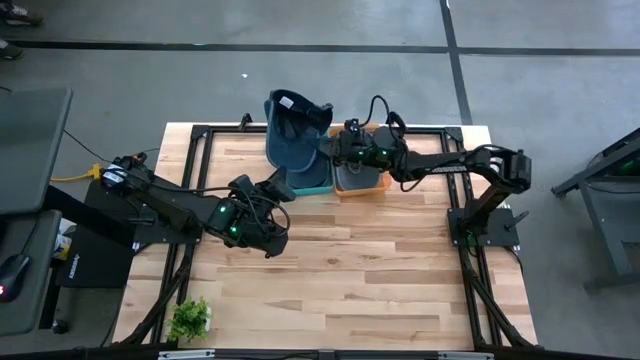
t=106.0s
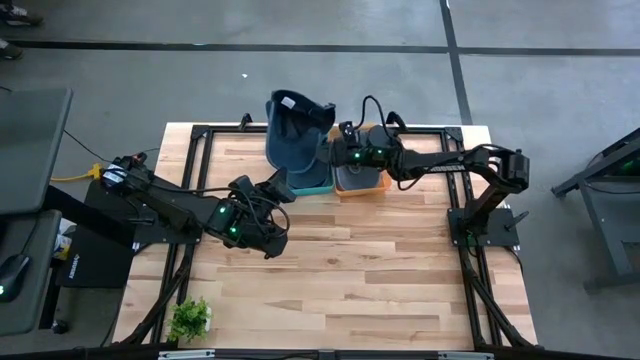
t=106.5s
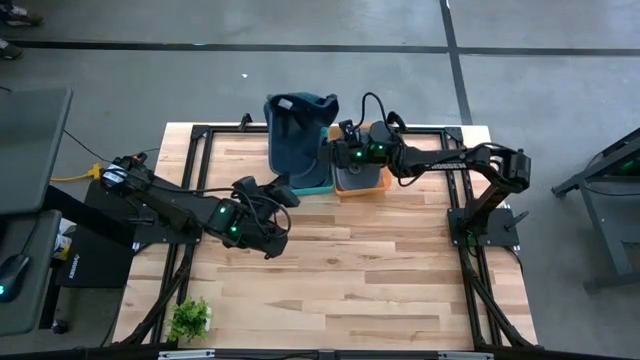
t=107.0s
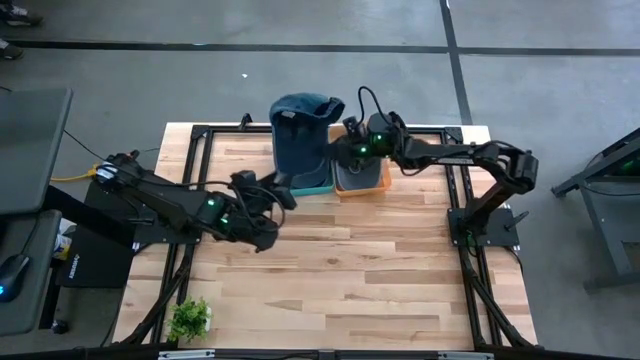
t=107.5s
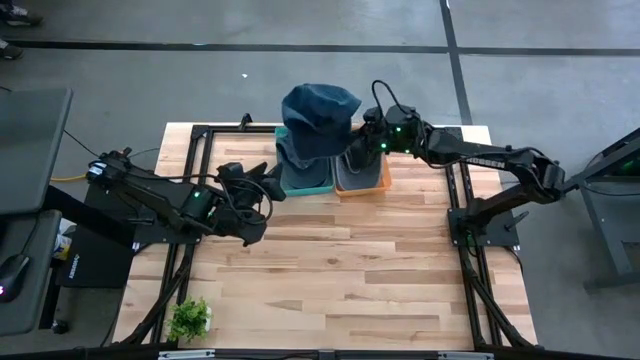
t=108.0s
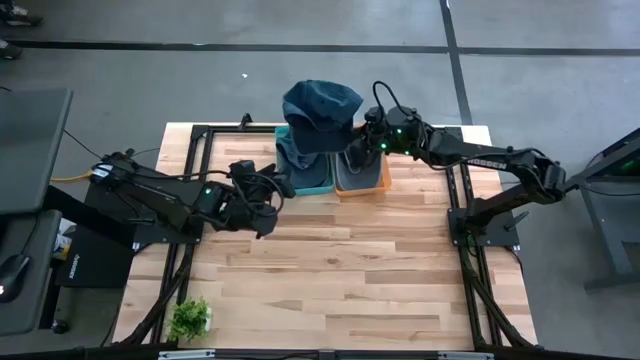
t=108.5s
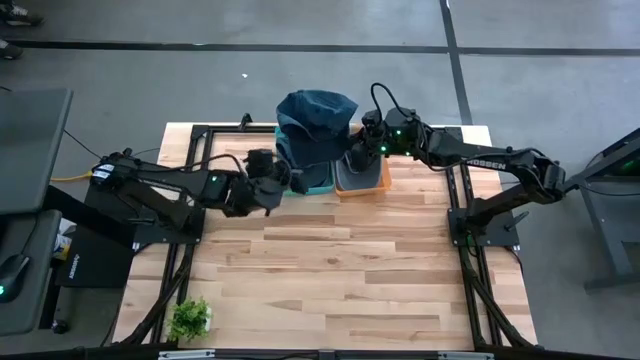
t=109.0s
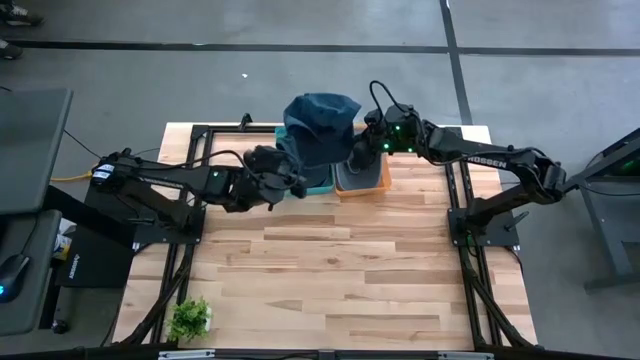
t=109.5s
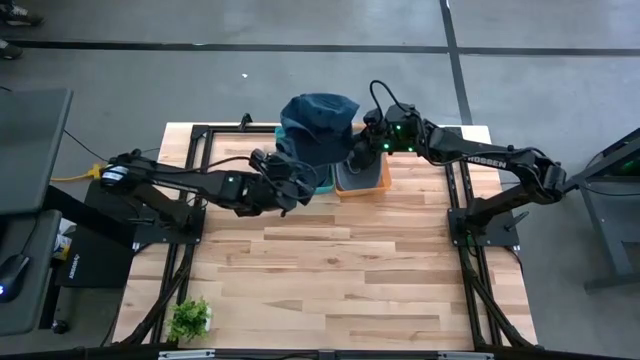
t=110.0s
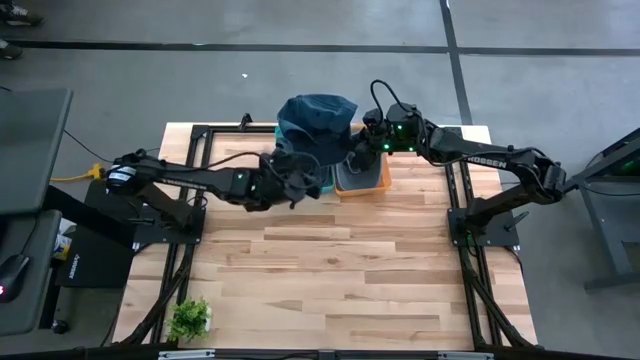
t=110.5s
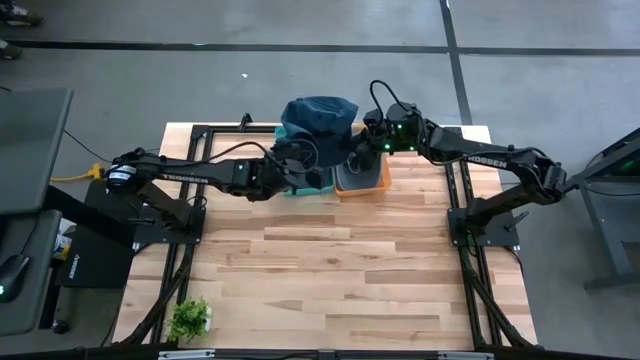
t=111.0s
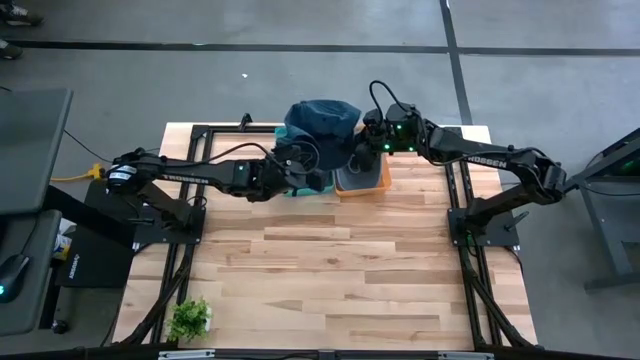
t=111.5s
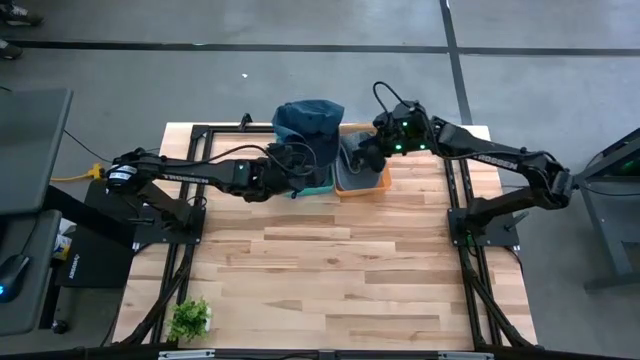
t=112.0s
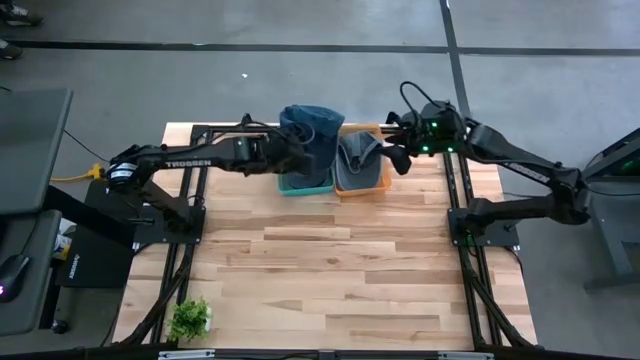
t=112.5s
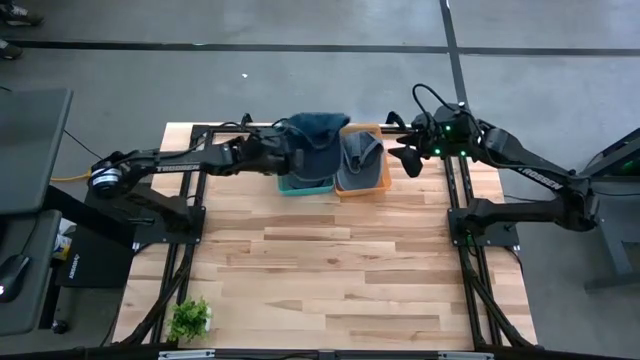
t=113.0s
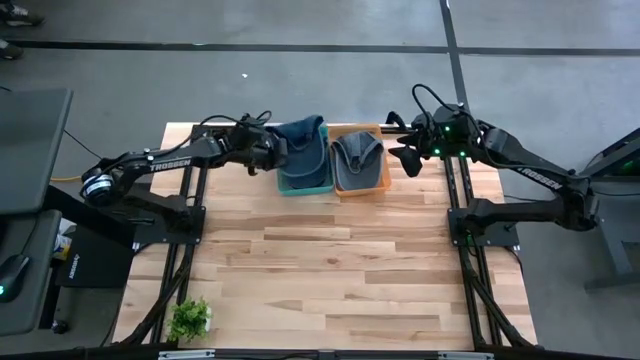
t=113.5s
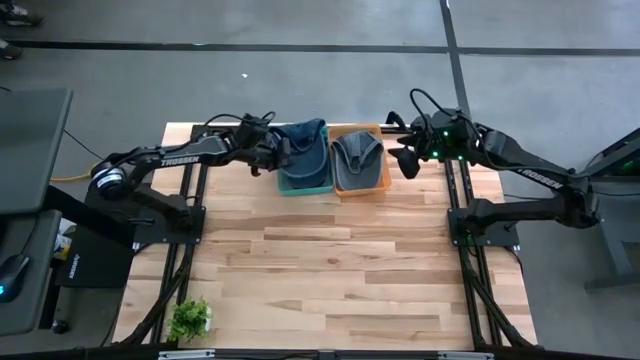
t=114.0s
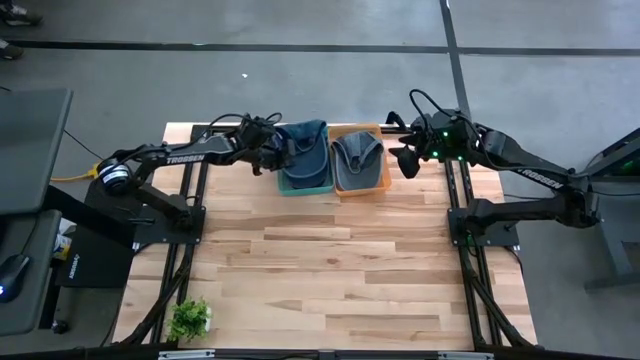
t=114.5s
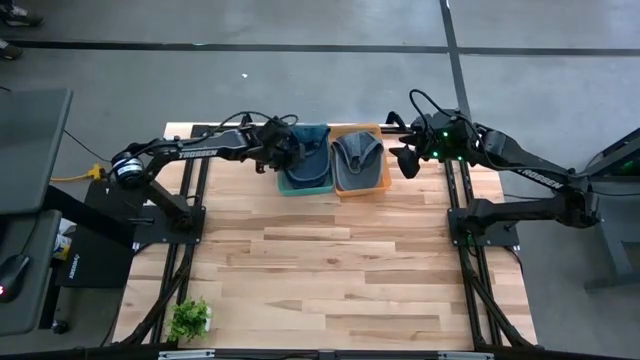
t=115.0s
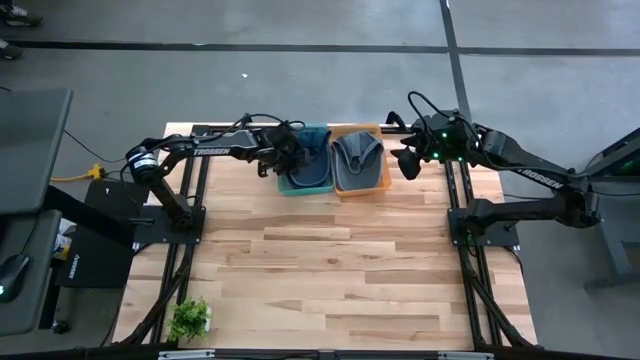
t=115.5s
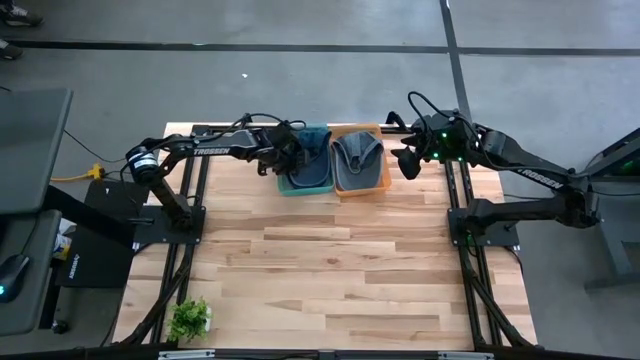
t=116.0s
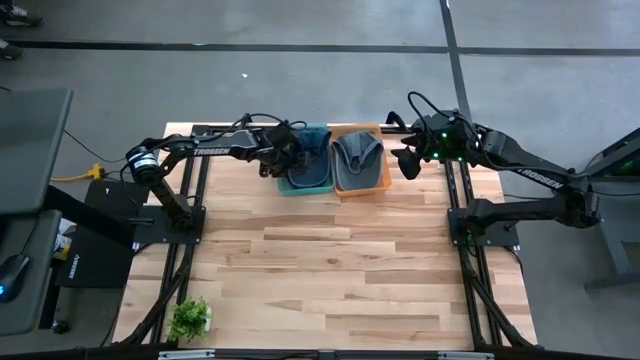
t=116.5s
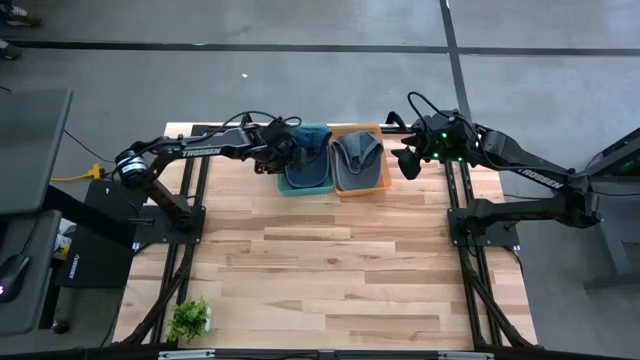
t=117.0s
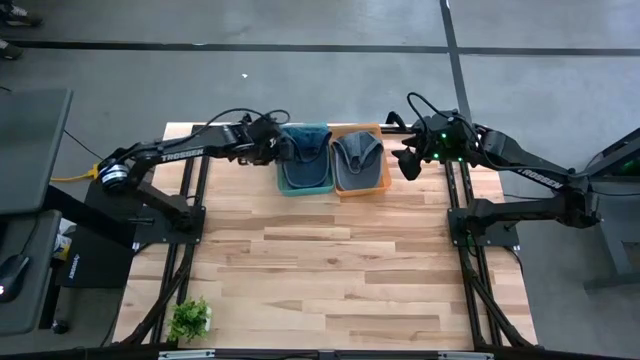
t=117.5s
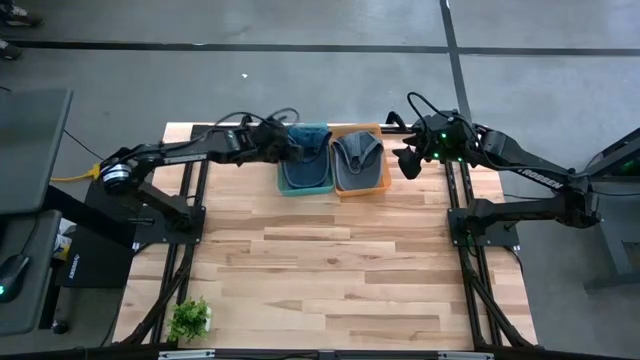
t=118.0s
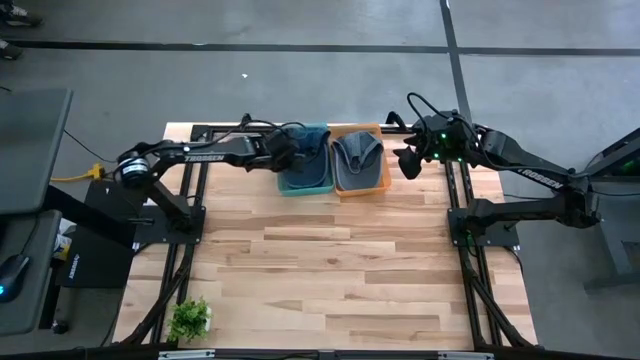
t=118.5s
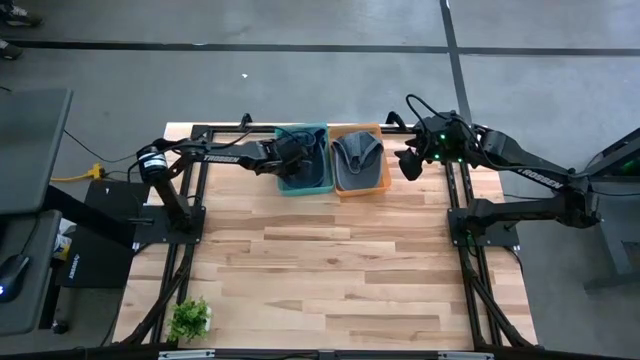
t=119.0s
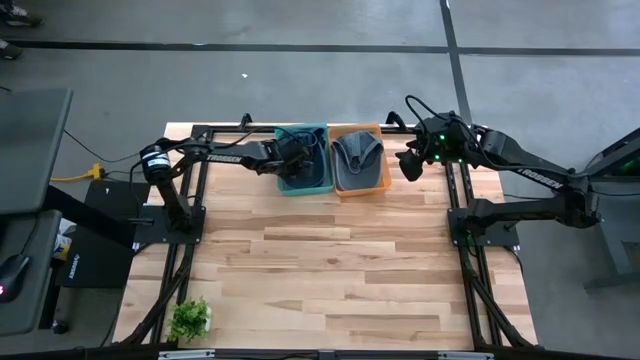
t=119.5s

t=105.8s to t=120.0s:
Task: Pick & Place hat
Put the blue cap into the green bin

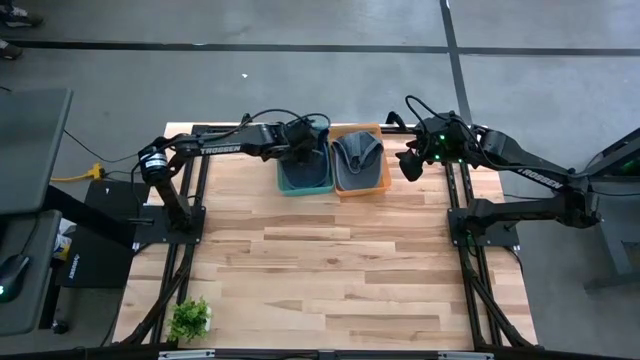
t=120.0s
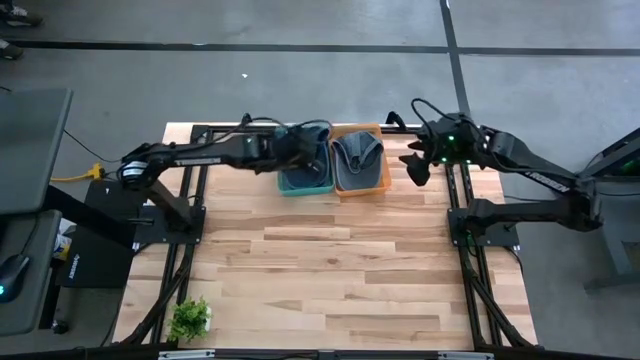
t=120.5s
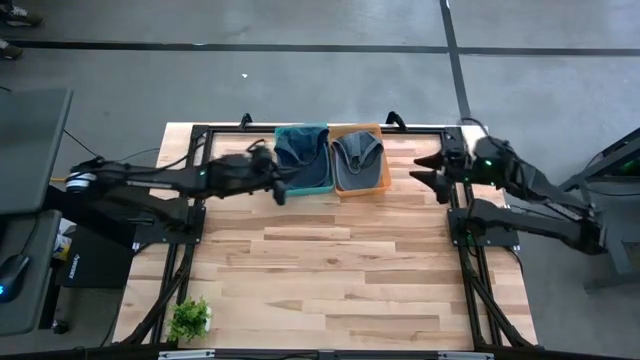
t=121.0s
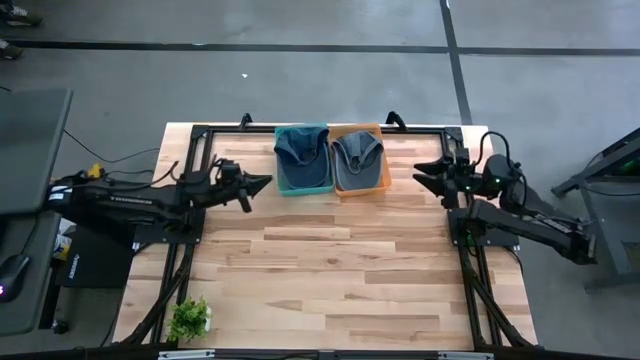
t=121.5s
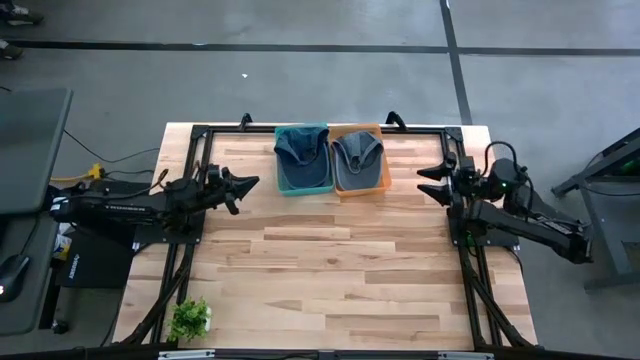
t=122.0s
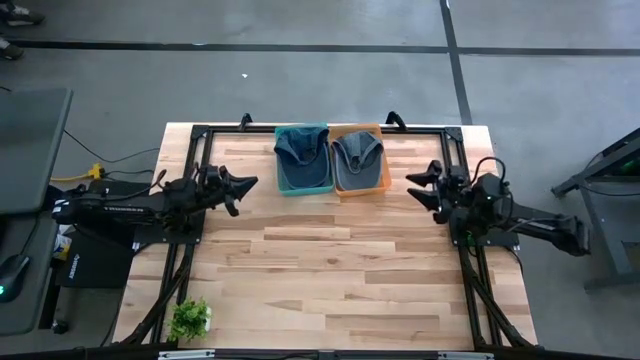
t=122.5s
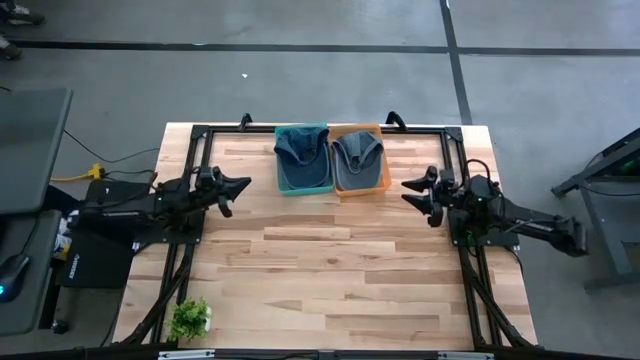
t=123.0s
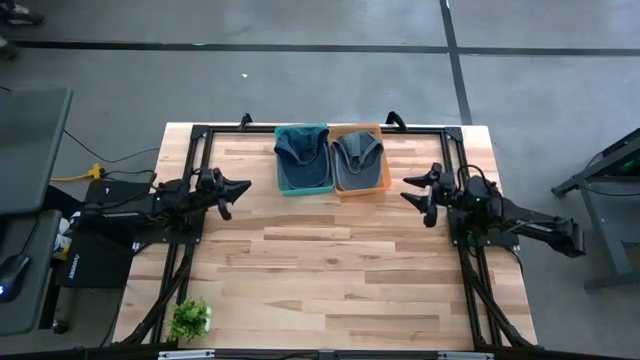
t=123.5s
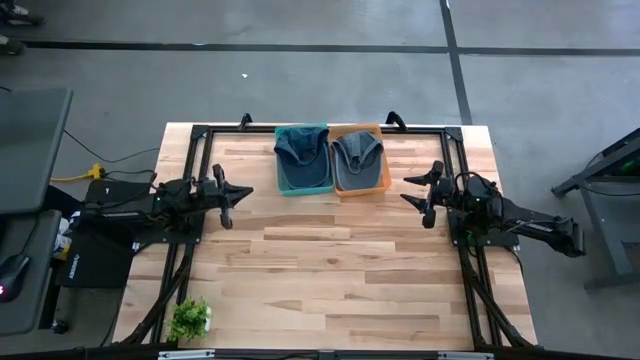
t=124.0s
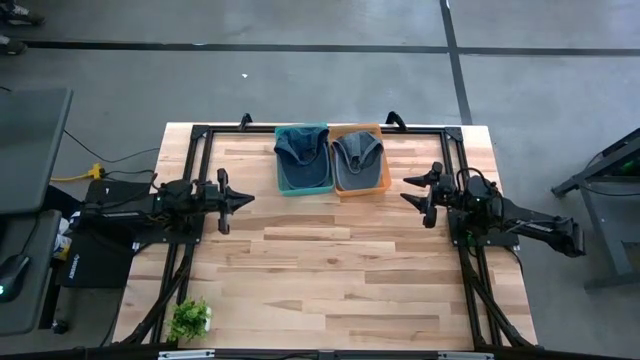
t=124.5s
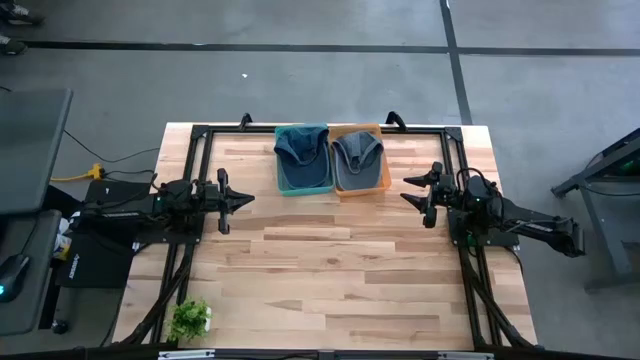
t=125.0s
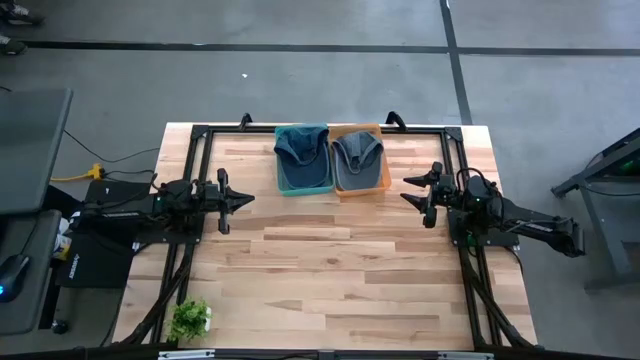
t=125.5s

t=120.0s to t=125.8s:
Return to Home Position
